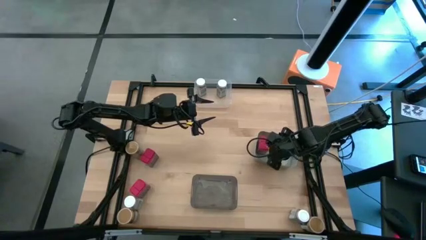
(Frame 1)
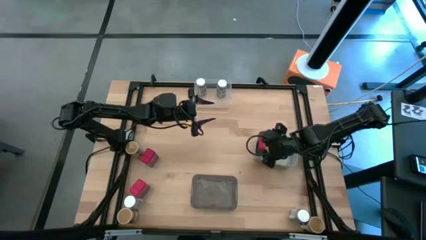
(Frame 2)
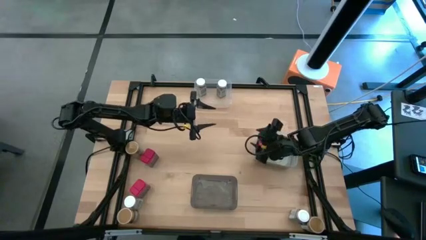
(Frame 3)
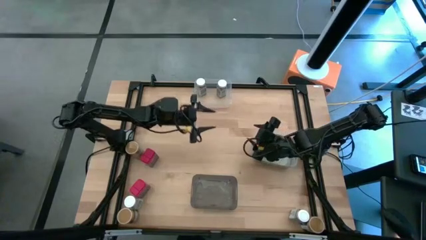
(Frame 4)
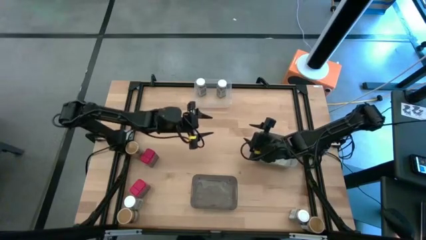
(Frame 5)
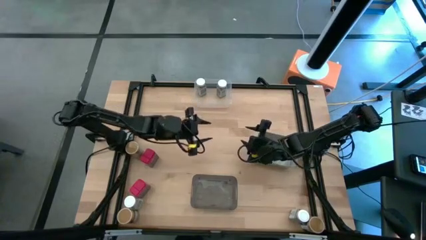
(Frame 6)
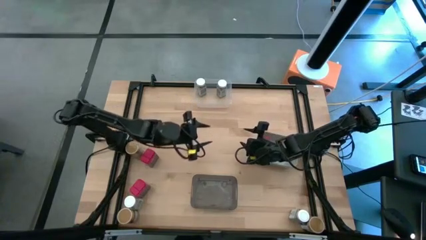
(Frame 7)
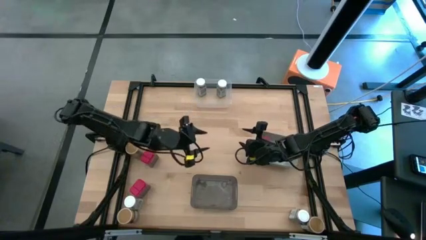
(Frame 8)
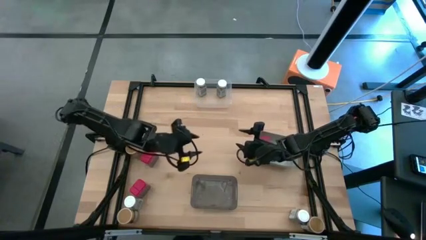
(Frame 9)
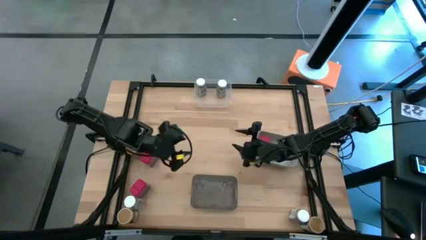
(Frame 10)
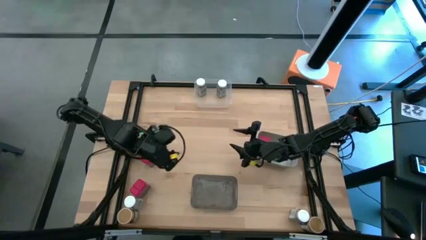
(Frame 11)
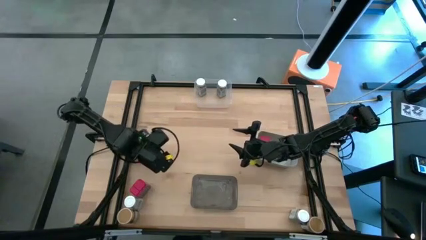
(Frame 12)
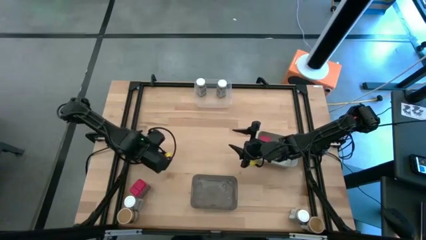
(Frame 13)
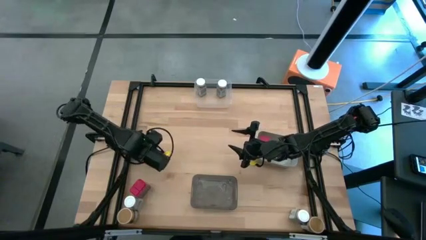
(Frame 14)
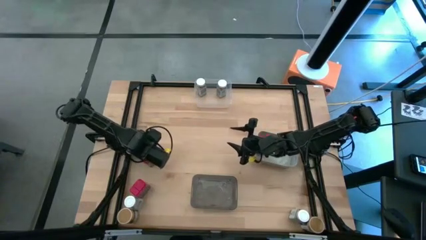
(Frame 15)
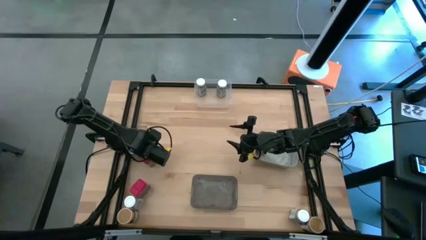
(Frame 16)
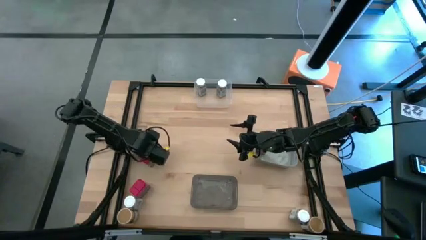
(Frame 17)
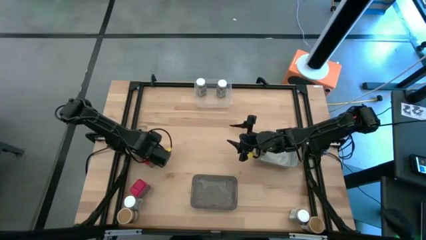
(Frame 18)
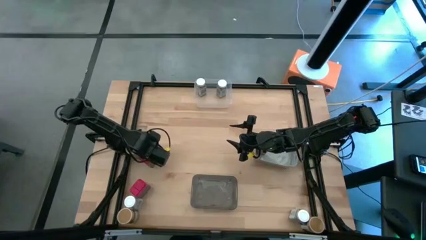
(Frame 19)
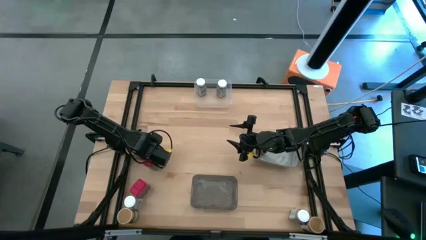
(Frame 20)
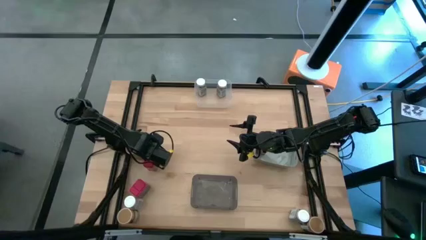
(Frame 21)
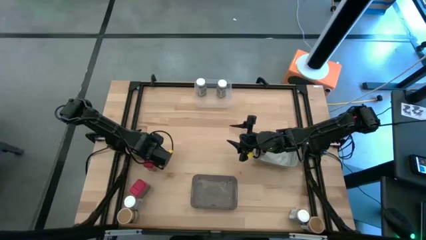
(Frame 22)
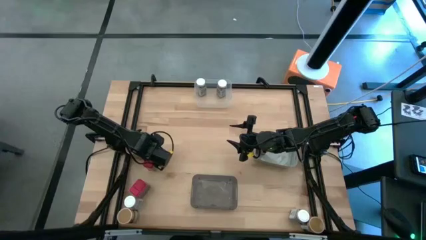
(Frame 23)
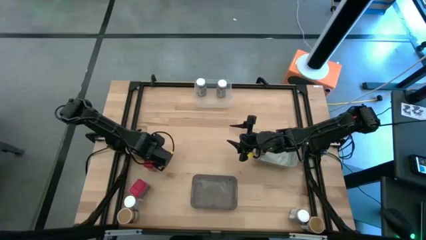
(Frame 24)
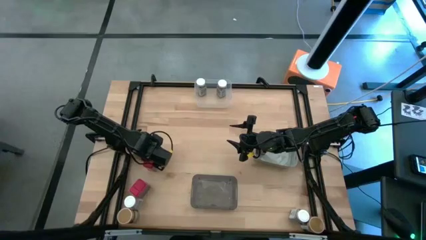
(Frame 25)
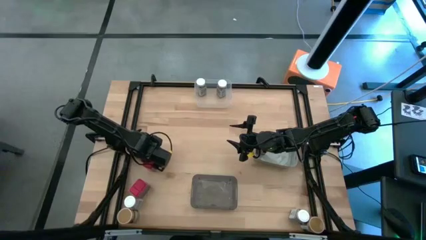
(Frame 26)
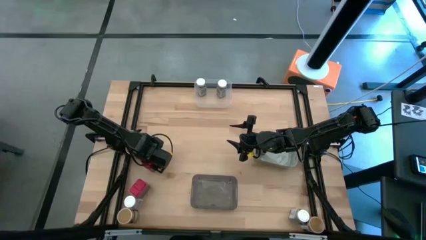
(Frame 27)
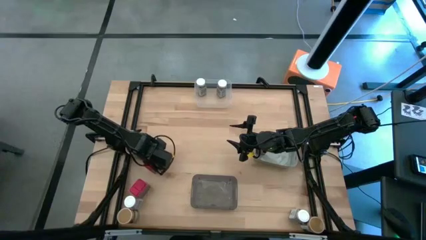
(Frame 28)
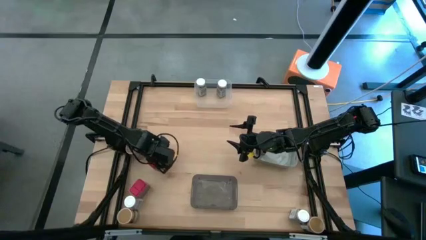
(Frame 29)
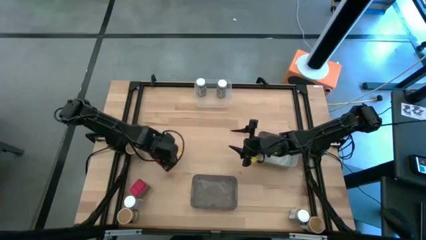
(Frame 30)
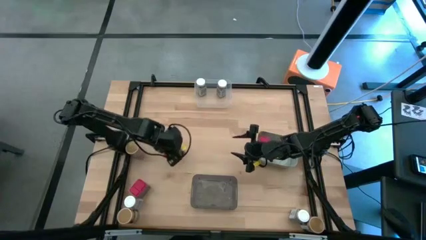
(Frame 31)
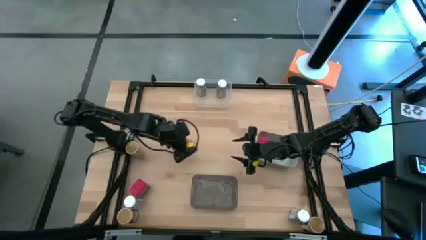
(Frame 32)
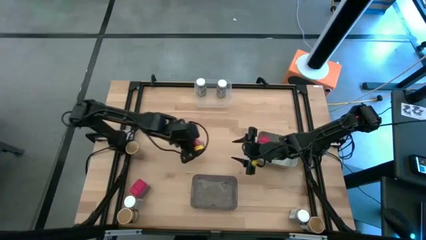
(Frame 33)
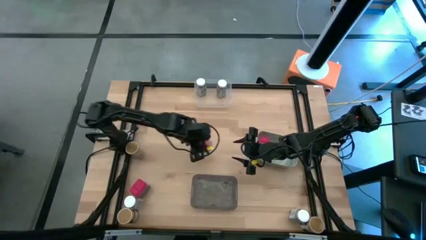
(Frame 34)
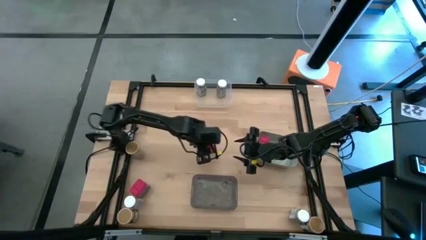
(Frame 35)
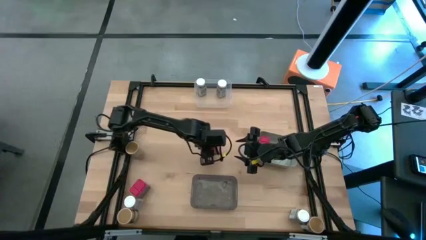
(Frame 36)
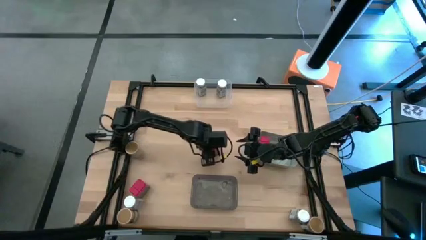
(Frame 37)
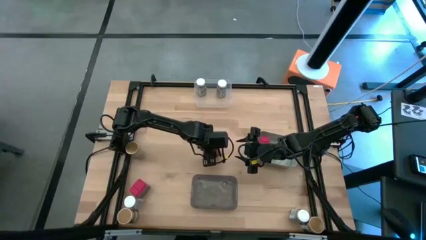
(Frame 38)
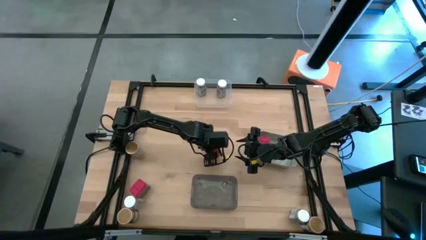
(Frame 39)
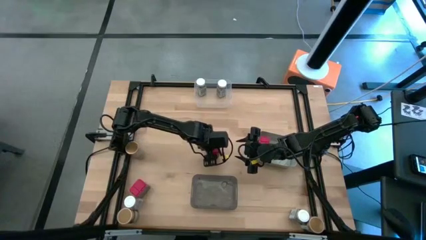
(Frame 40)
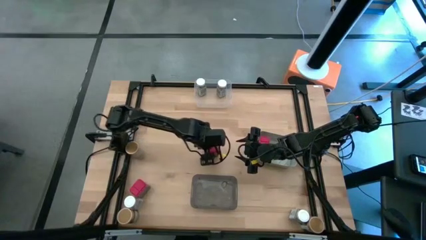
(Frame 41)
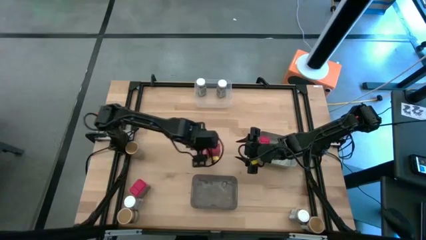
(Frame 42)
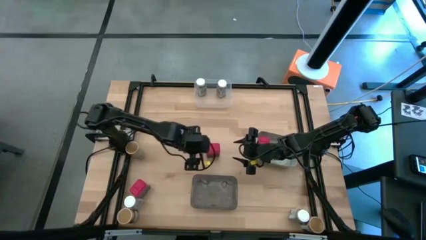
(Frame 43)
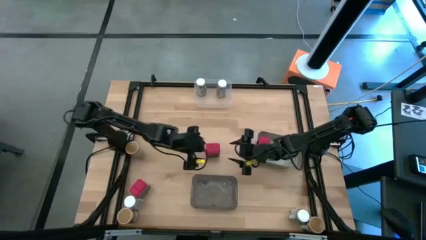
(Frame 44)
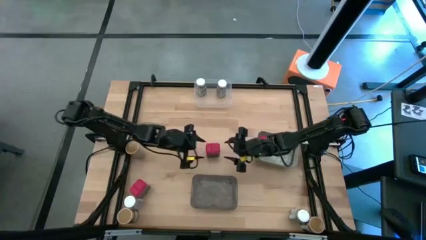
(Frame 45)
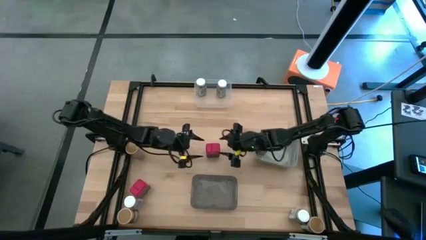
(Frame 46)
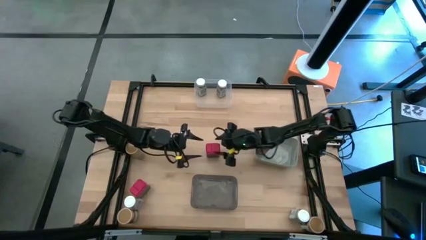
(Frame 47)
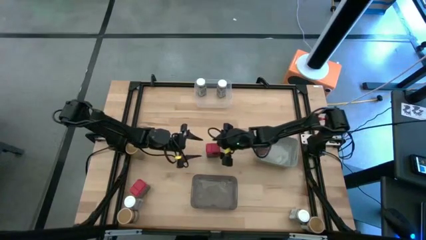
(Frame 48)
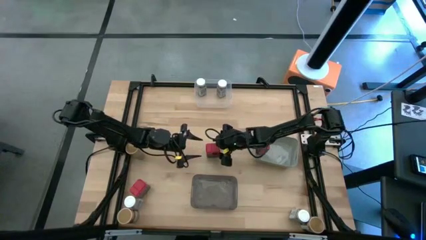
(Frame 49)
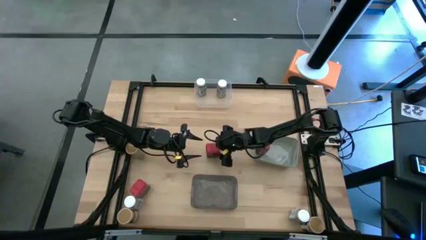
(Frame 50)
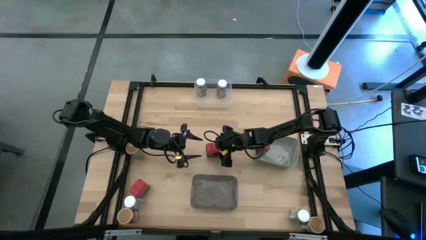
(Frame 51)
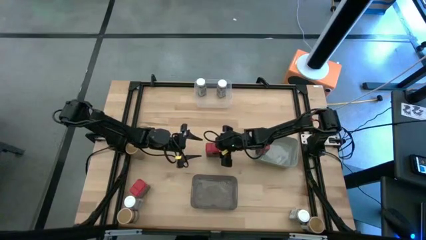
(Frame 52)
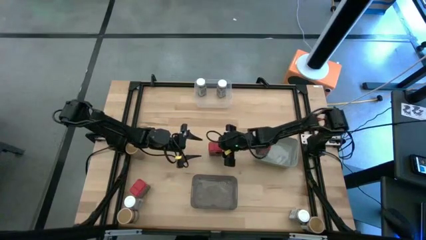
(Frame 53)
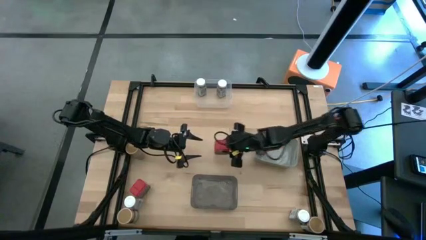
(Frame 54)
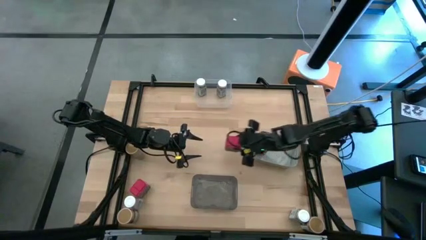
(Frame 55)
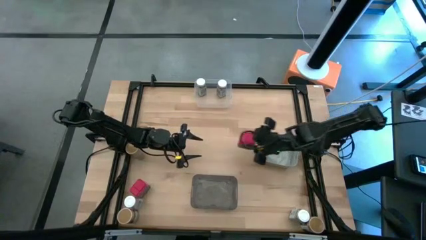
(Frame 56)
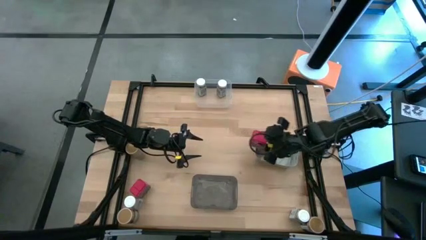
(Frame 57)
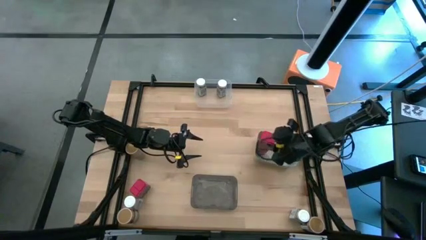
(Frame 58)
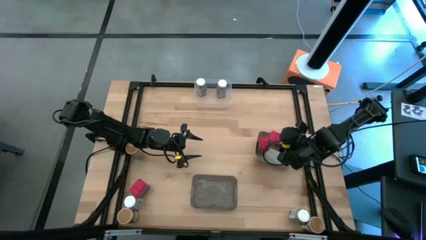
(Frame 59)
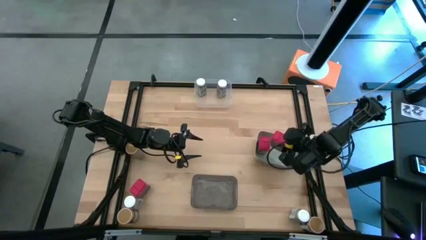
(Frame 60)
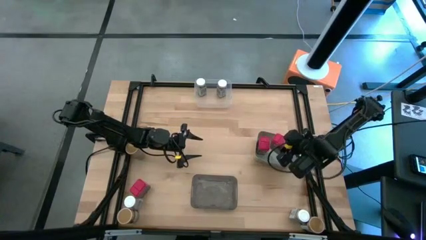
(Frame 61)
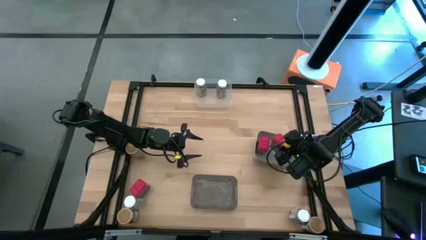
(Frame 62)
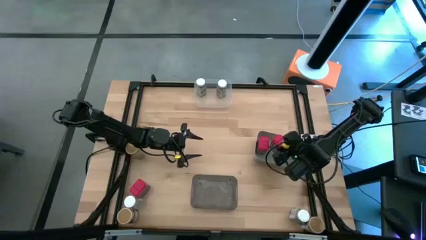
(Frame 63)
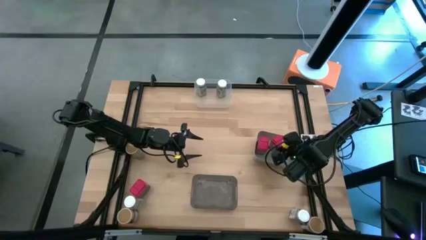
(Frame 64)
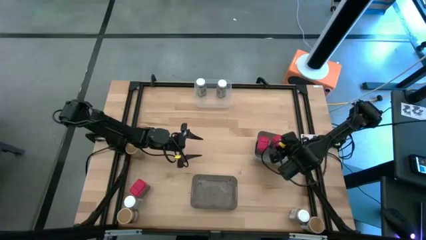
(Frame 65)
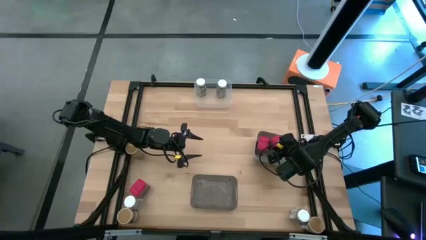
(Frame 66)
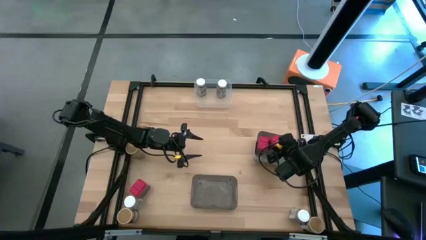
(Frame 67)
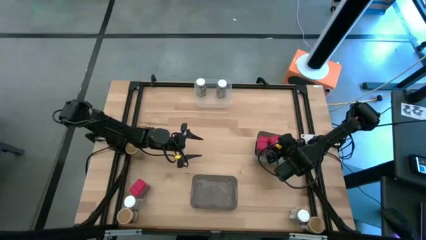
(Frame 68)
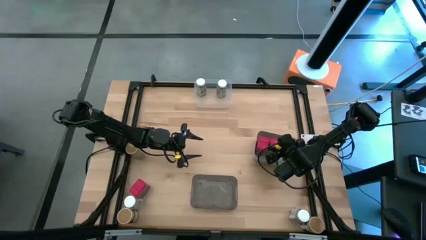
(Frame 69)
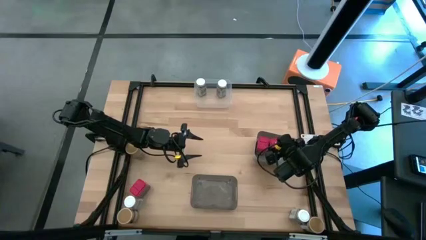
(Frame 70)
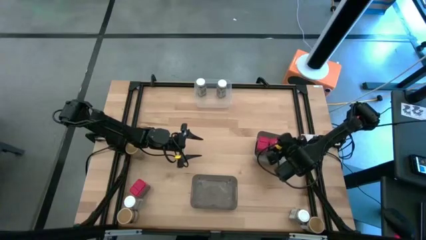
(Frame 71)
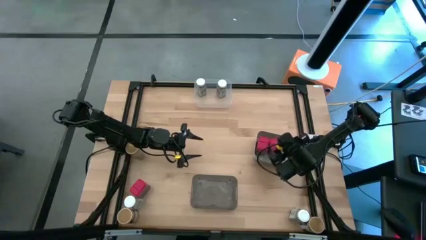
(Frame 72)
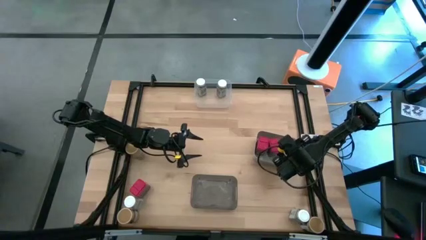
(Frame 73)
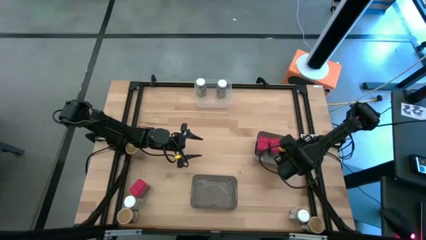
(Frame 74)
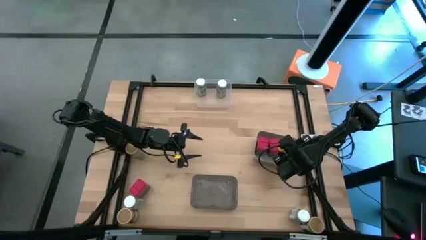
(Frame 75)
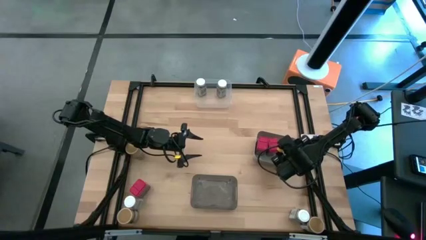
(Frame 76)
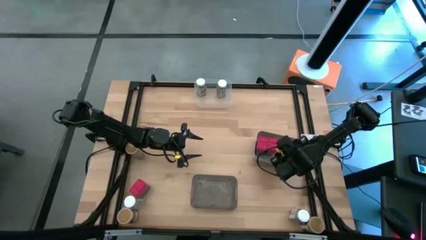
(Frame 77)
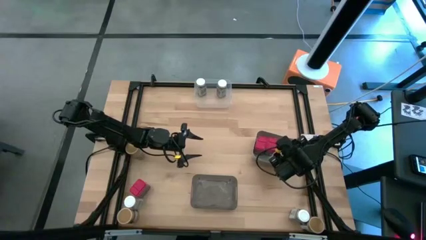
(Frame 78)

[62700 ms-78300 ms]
Task: Sort spices by type
Put the red seasoning can into the gray bin
